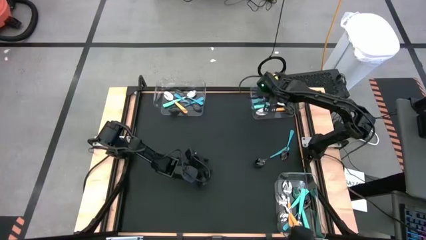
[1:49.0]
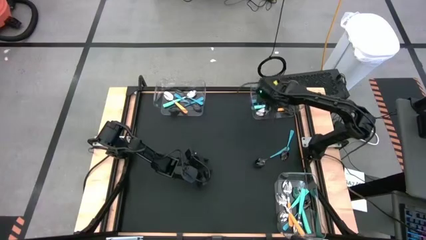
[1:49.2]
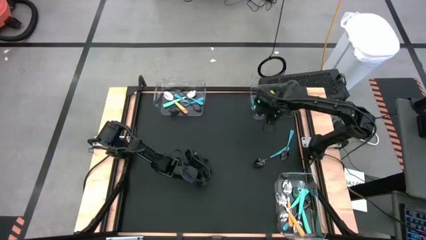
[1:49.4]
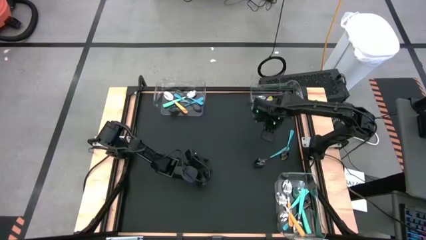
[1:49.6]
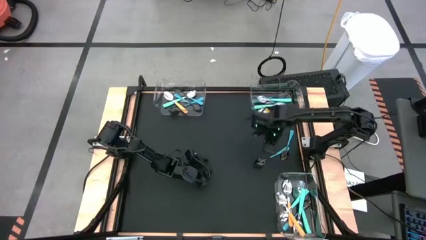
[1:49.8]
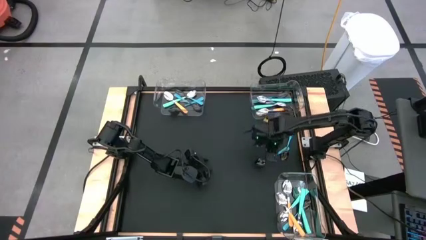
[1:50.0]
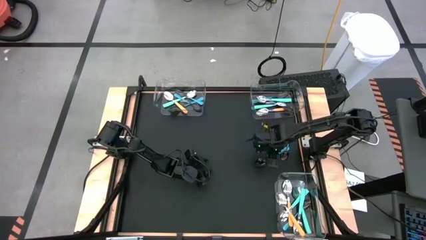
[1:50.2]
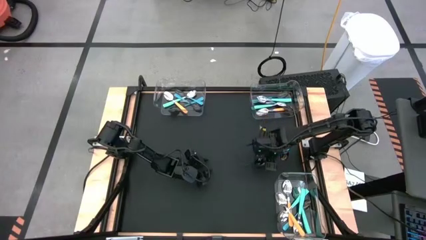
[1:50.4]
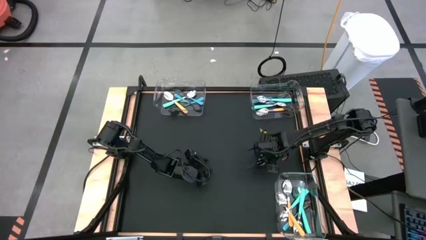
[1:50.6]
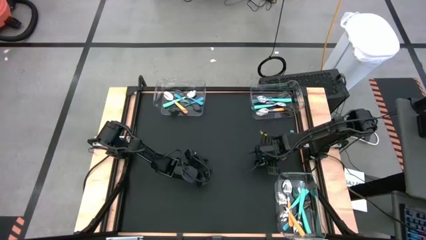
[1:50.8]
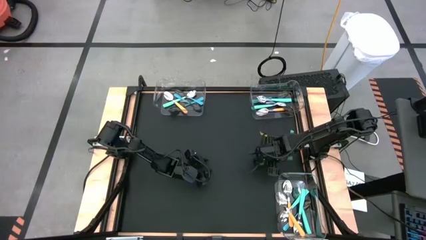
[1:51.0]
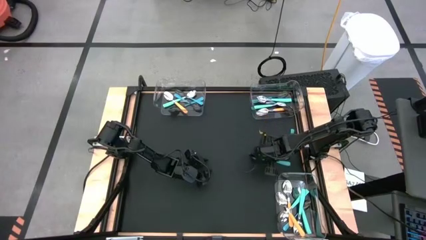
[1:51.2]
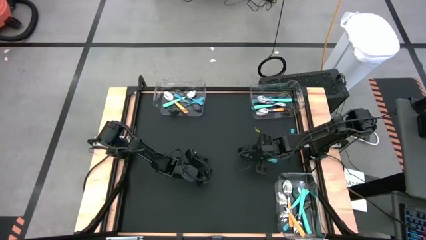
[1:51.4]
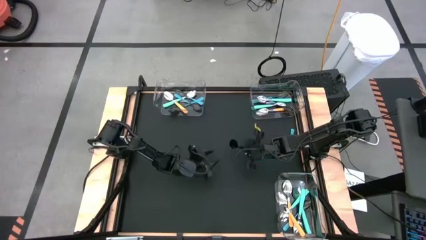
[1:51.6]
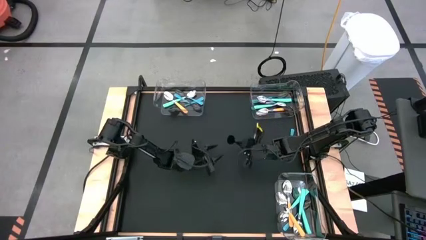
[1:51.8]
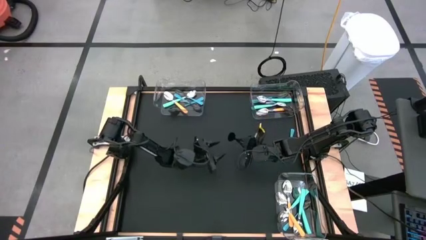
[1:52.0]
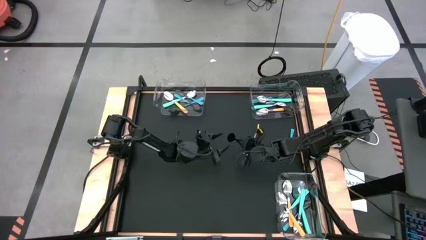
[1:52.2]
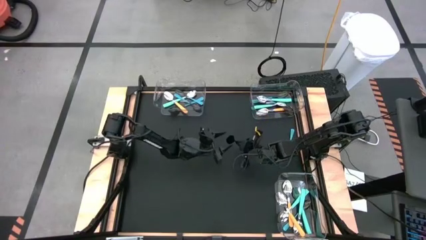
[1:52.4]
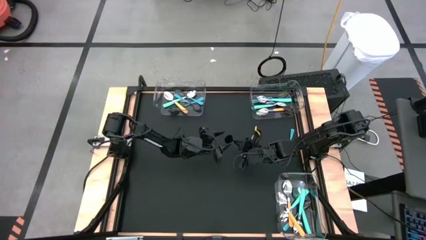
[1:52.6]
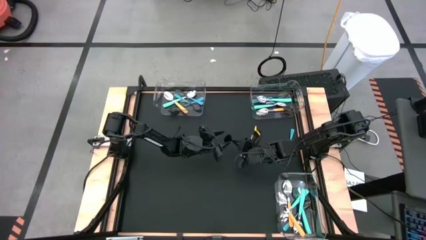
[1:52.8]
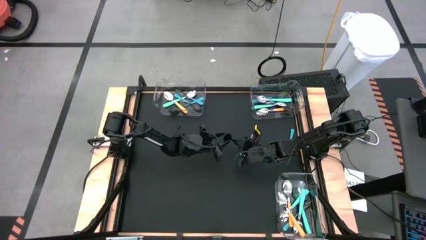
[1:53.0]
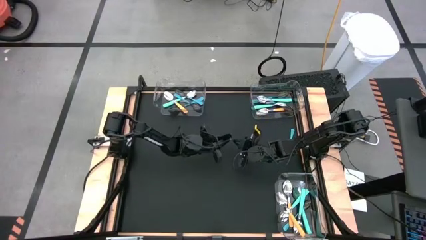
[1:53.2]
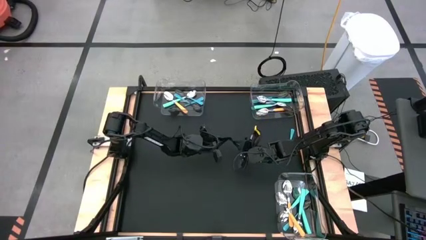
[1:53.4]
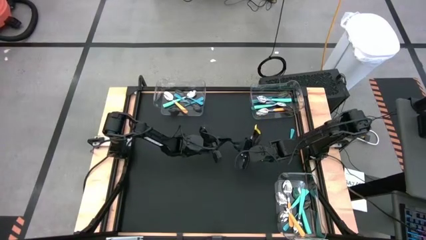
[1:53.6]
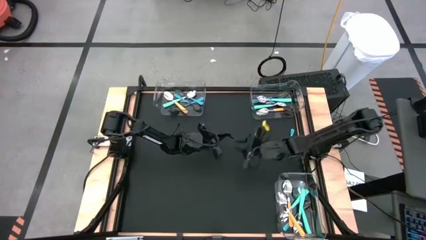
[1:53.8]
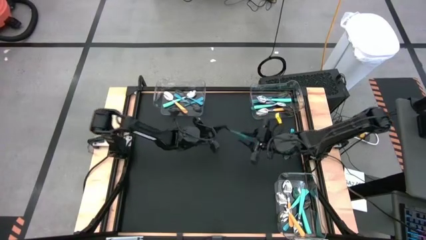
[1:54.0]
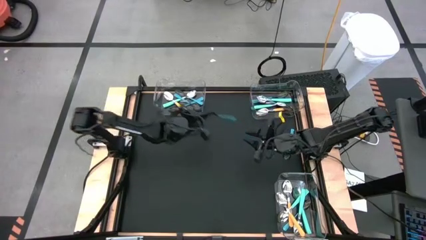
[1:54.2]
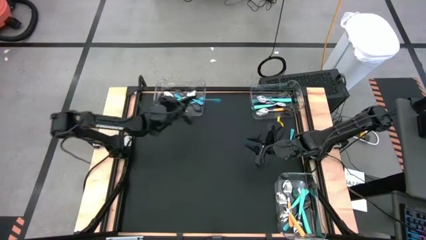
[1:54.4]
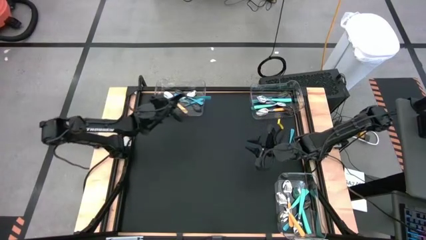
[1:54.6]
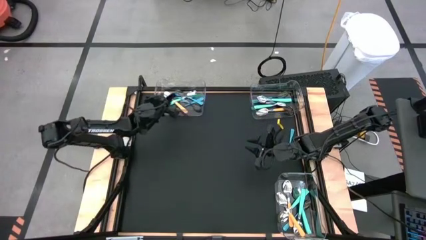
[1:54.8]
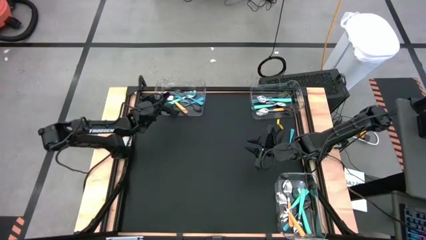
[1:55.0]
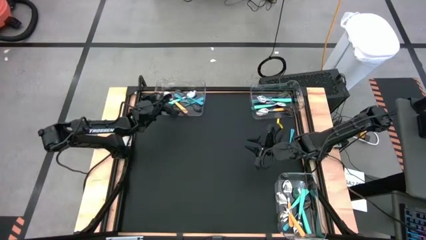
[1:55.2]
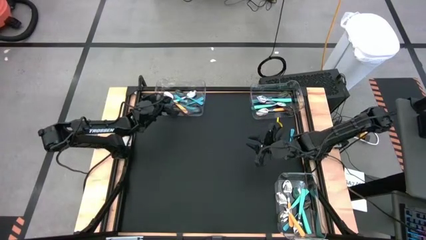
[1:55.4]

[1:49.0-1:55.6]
Task: Sort silverware by color (type)
Put the blue spoon into the top left transparent bin

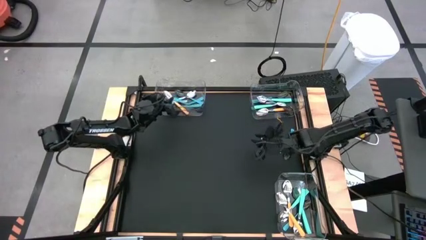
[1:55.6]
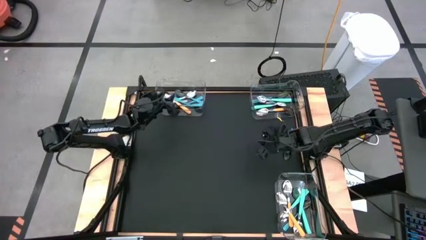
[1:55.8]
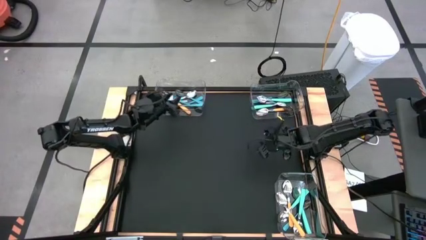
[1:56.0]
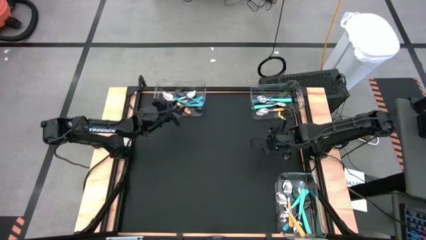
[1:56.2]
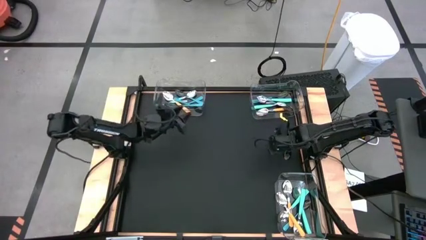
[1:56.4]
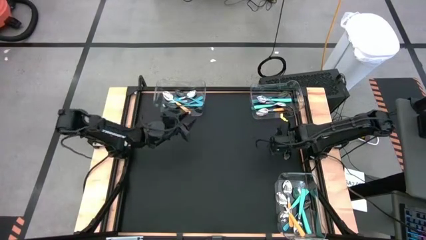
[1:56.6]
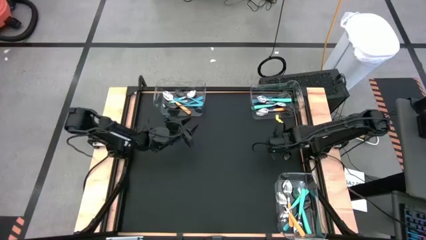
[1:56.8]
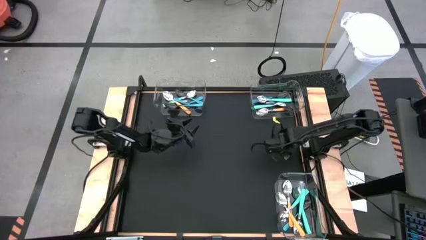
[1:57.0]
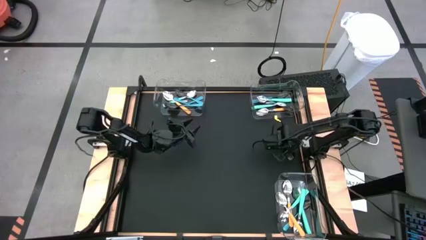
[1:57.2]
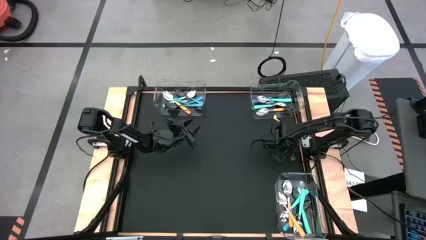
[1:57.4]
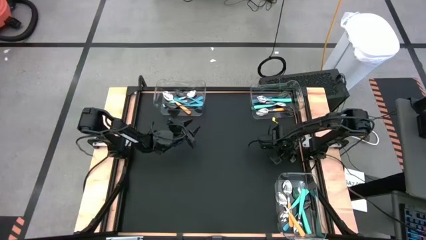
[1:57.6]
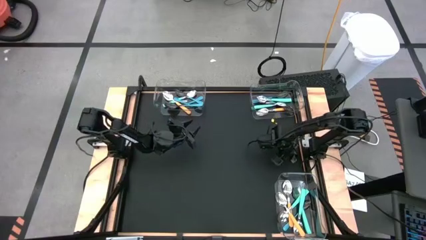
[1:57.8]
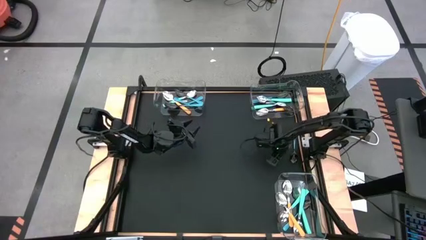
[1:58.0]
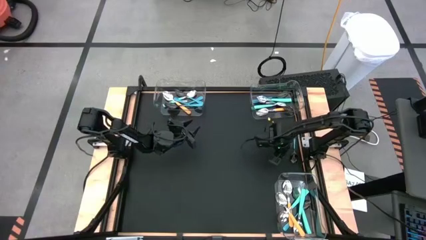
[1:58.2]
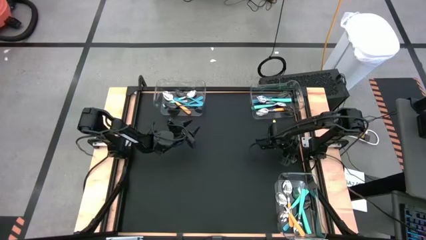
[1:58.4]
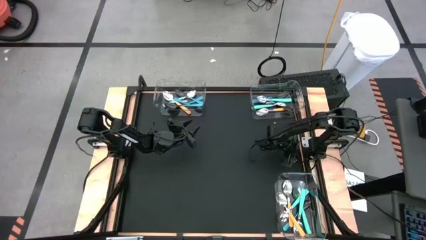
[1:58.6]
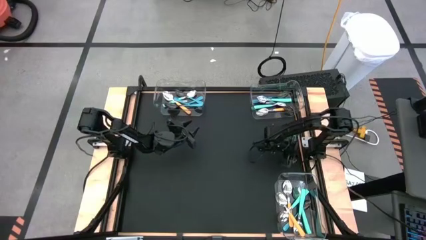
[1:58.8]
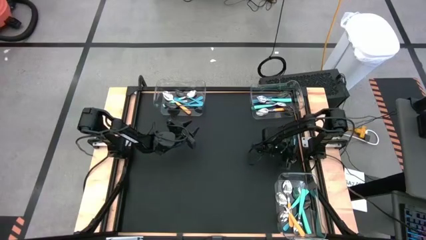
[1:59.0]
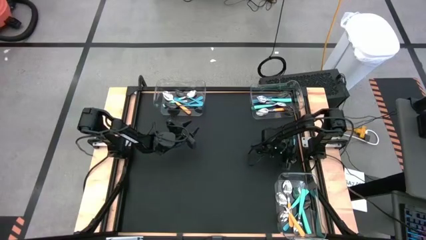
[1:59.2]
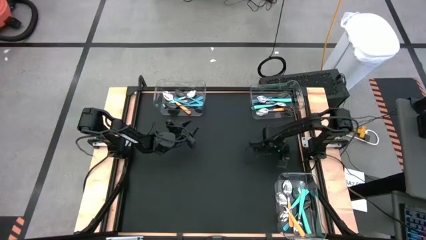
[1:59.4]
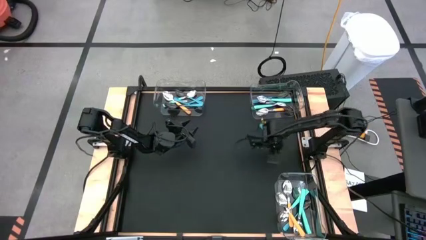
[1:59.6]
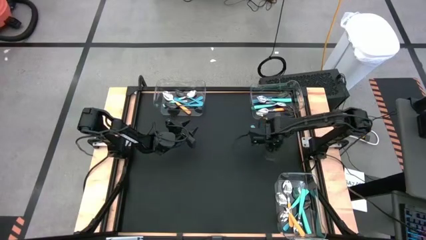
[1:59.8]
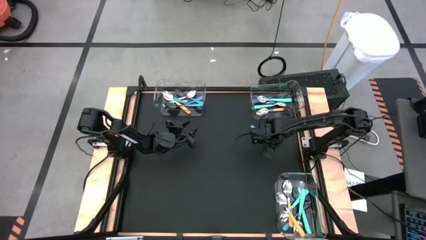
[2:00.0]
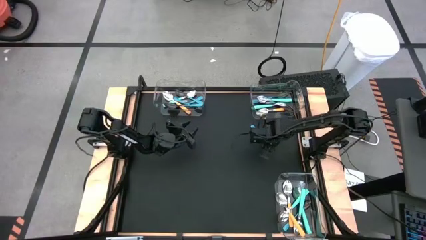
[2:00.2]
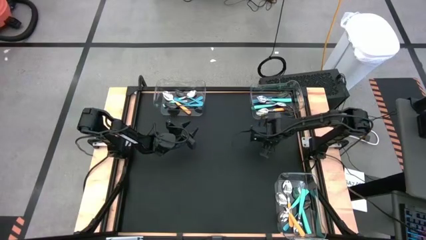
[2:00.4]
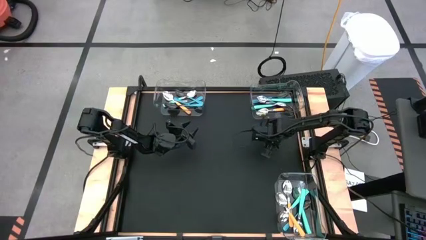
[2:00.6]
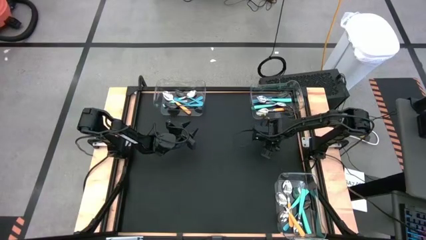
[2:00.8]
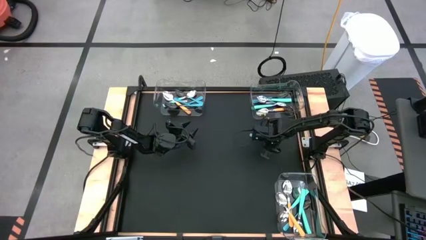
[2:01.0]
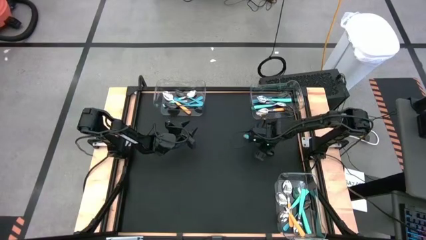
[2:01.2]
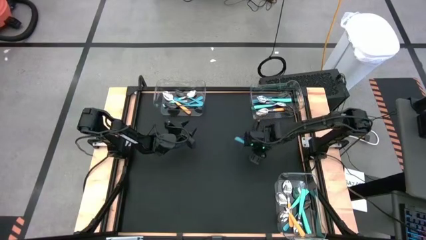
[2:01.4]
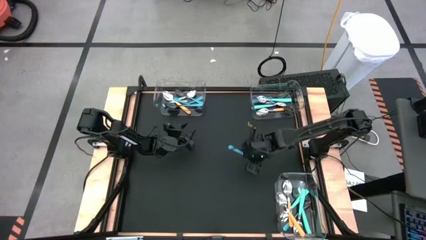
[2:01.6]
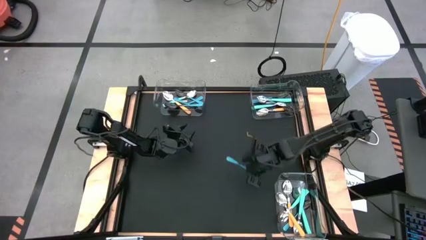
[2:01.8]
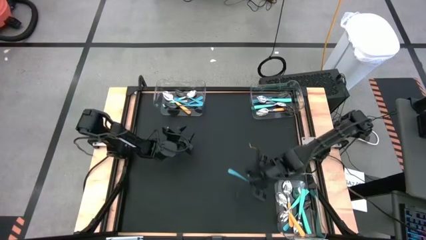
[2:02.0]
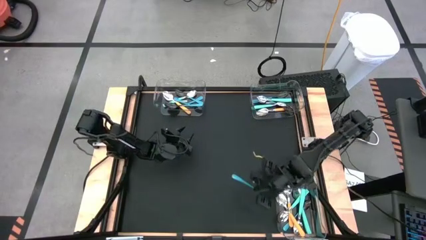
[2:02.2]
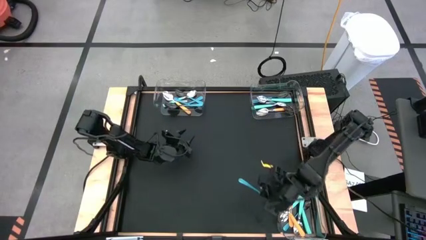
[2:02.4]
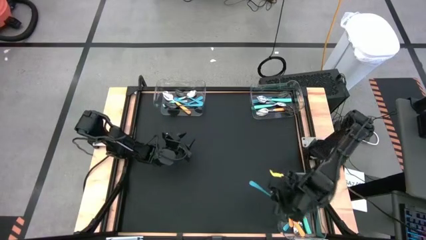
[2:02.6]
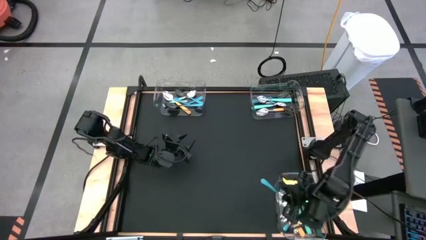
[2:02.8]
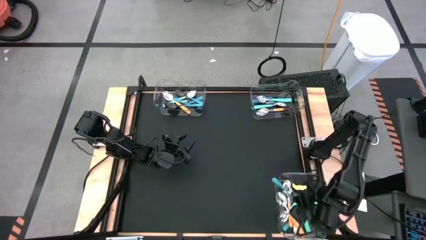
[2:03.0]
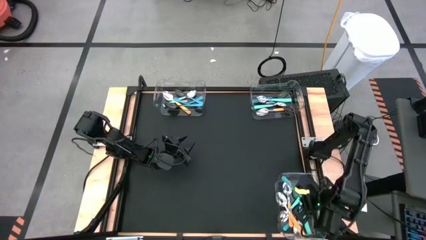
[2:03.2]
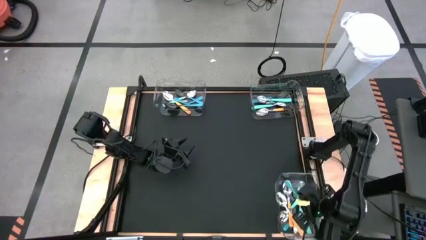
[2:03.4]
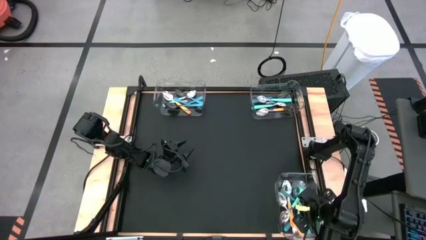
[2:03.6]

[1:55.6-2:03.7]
Put the blue spoon into the bottom transparent bin

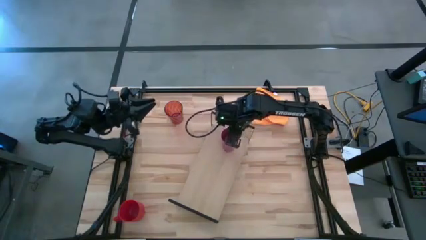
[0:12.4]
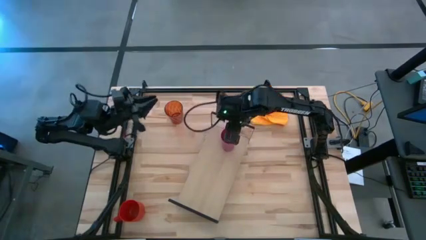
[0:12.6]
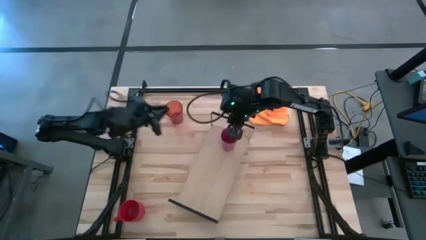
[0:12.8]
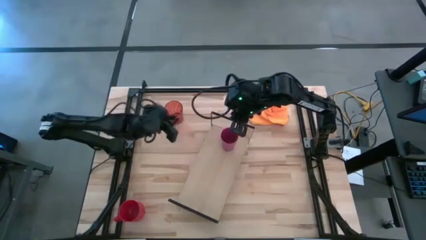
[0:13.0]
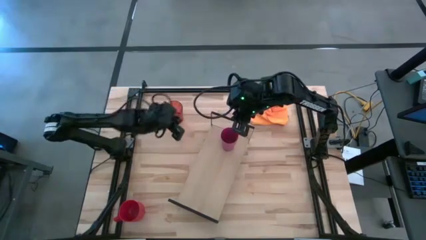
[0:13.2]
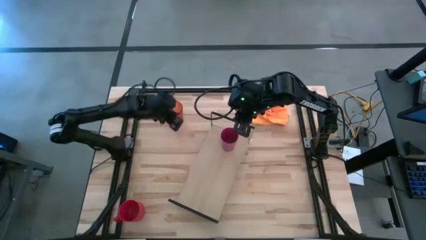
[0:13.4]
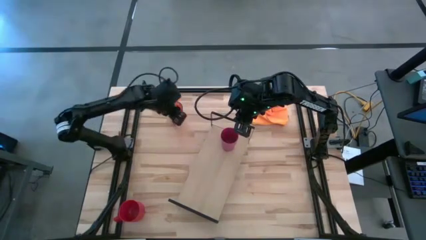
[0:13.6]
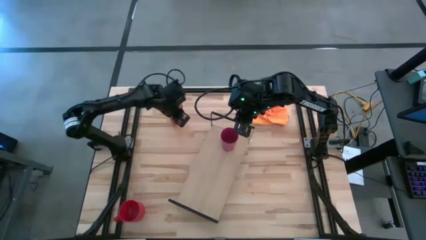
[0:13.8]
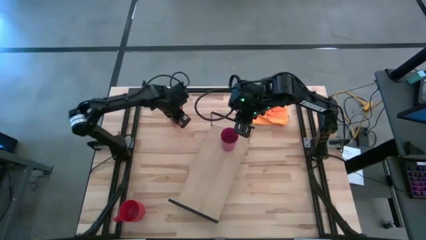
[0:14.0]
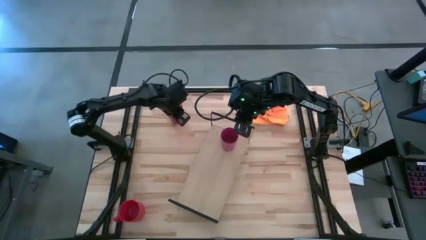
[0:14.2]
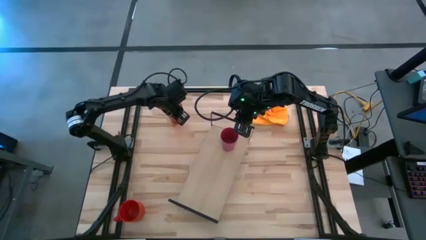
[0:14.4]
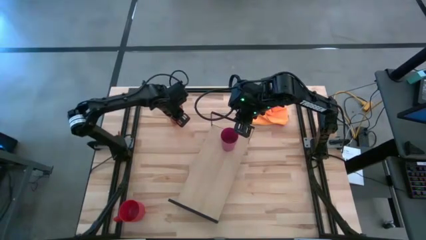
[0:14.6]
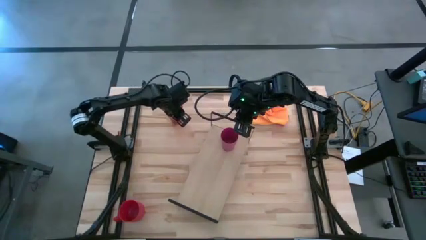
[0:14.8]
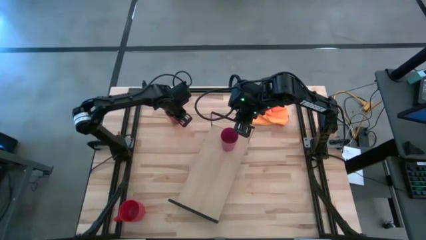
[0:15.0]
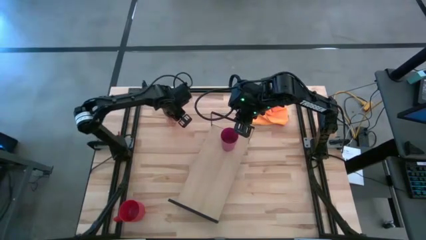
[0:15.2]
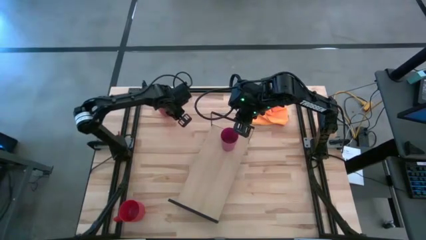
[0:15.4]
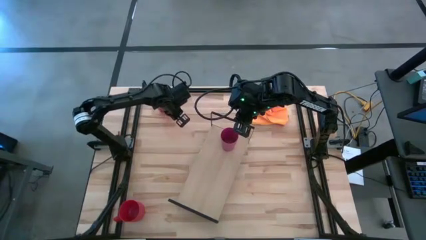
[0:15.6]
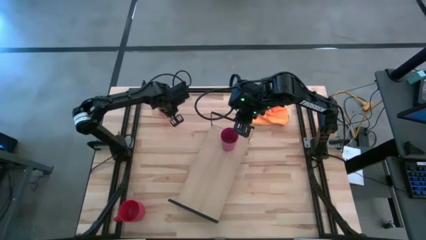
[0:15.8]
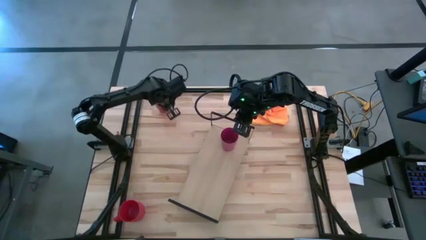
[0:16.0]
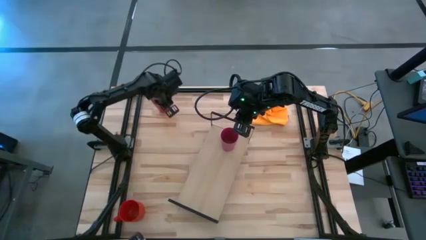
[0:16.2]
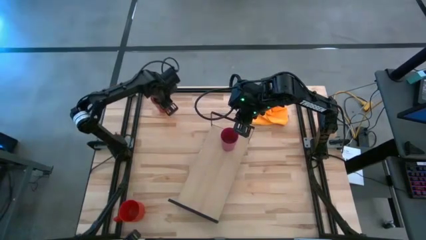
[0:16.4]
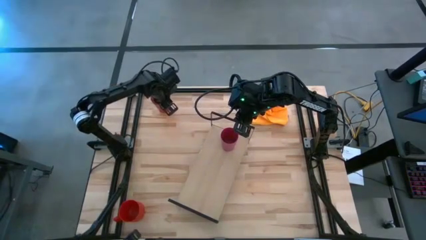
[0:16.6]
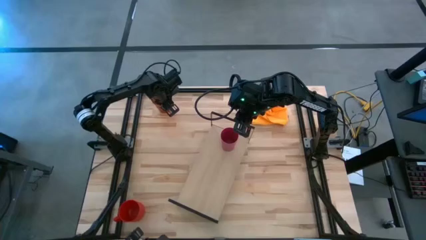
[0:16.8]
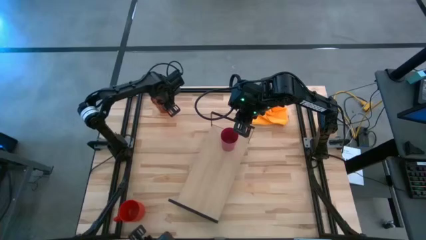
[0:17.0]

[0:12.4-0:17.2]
Task: Stack small to large cups/mugs on shelf
Put the orange glass cup on the shelf
